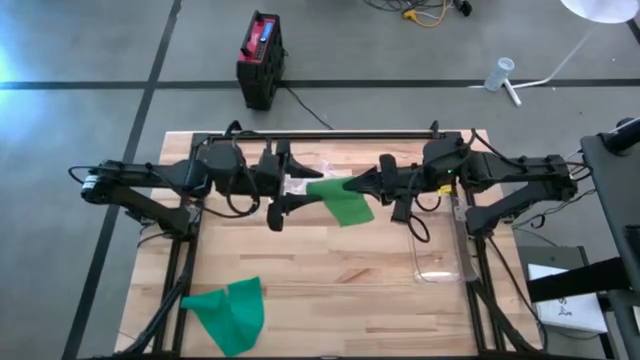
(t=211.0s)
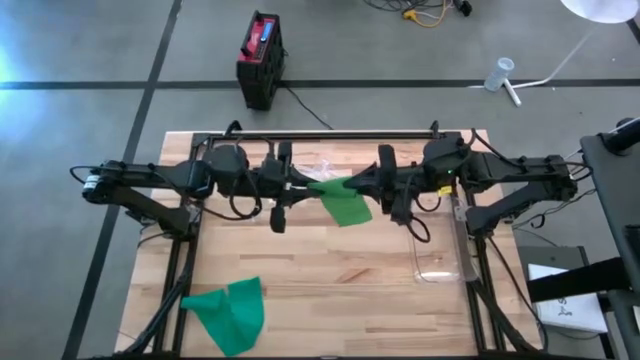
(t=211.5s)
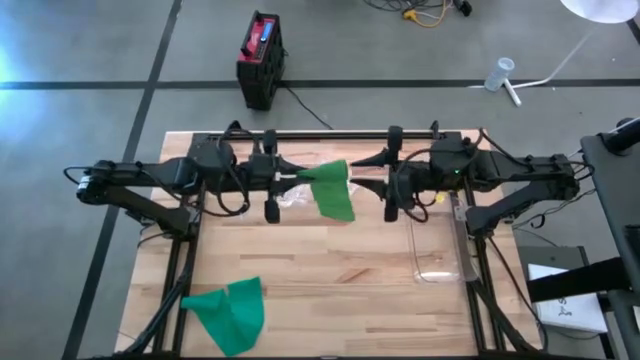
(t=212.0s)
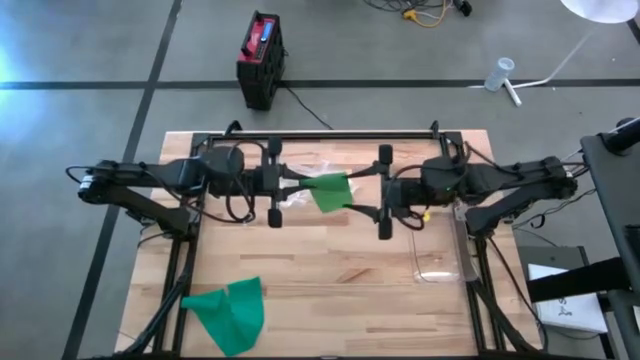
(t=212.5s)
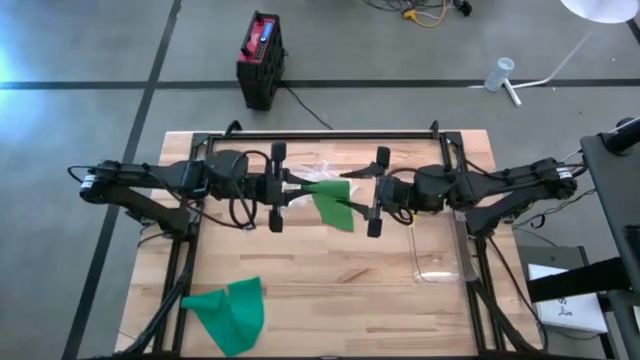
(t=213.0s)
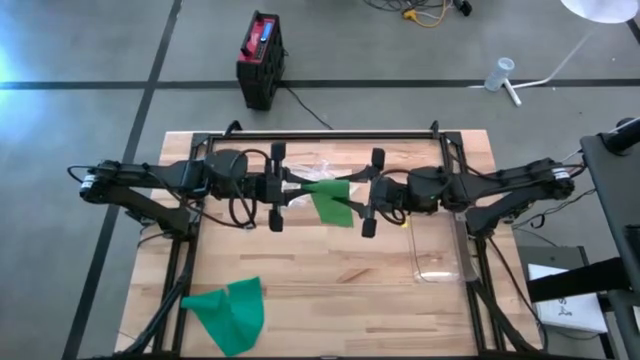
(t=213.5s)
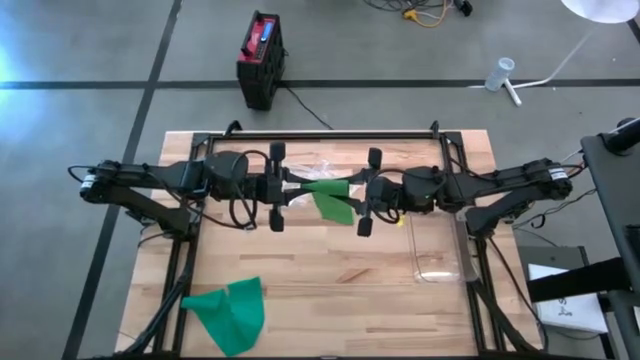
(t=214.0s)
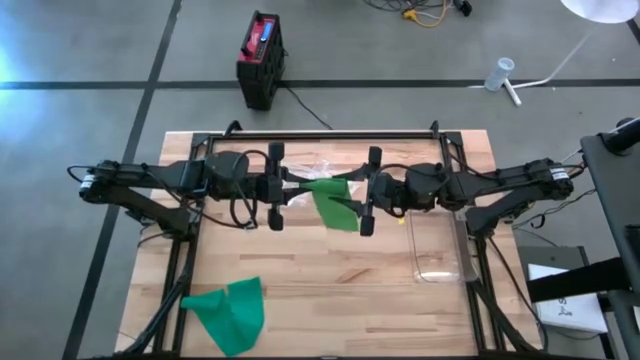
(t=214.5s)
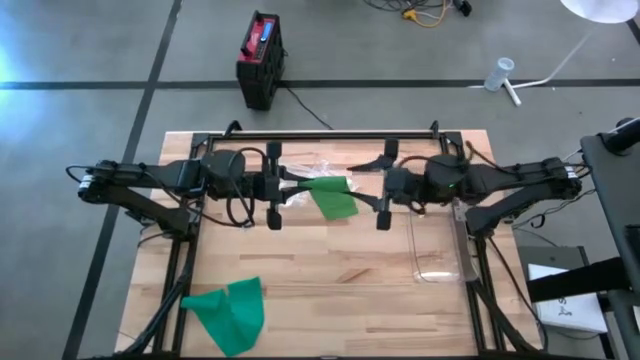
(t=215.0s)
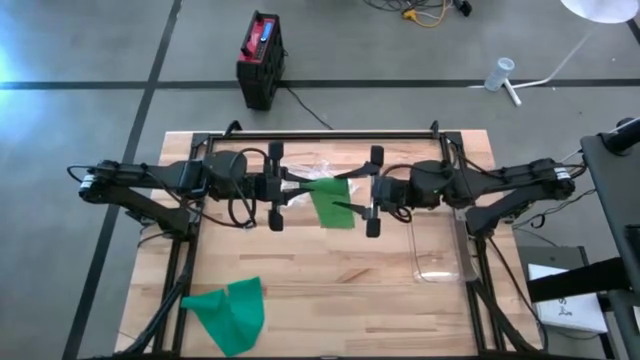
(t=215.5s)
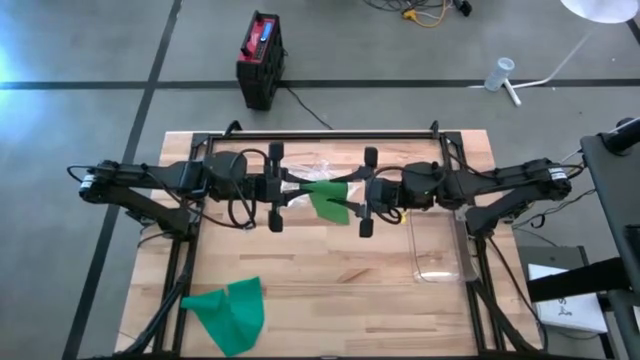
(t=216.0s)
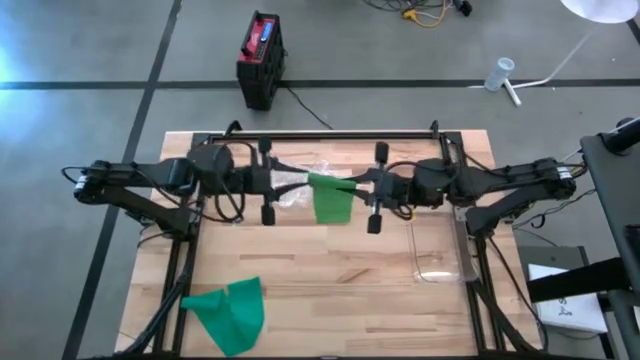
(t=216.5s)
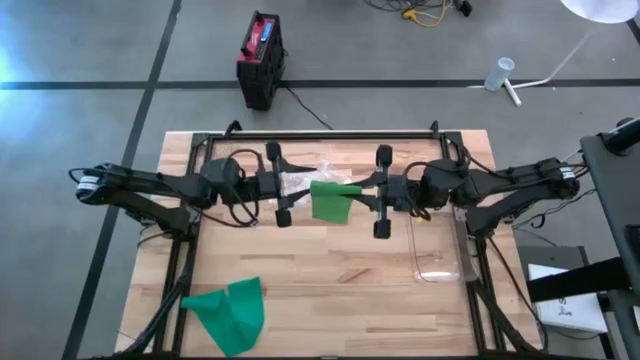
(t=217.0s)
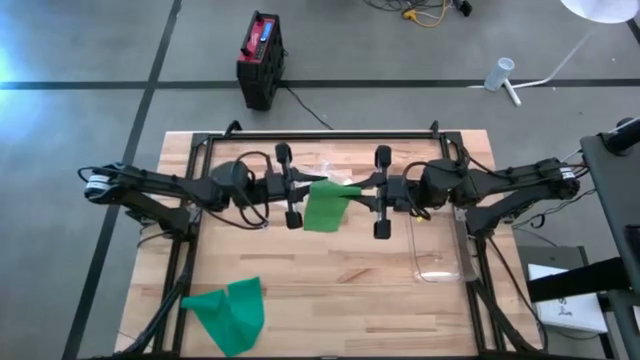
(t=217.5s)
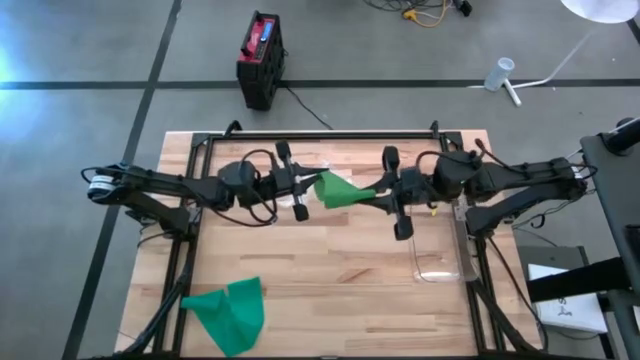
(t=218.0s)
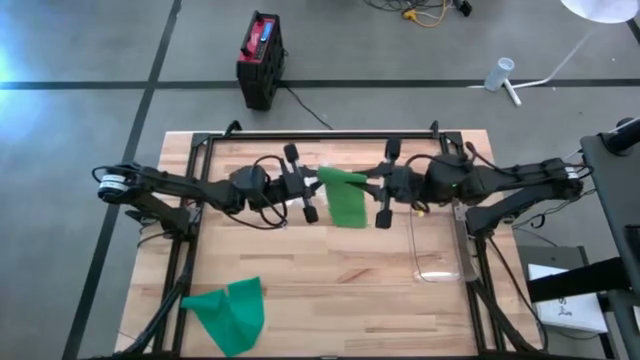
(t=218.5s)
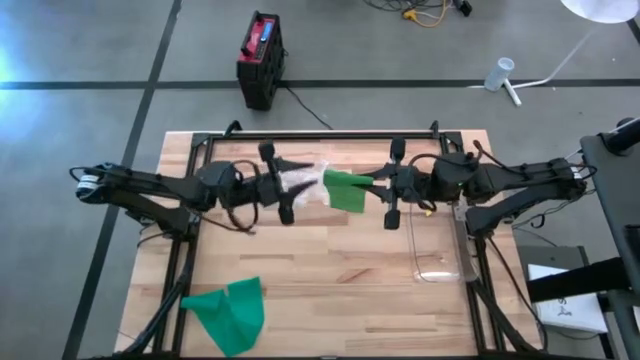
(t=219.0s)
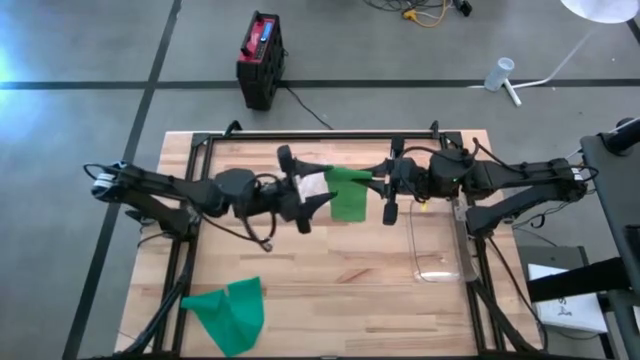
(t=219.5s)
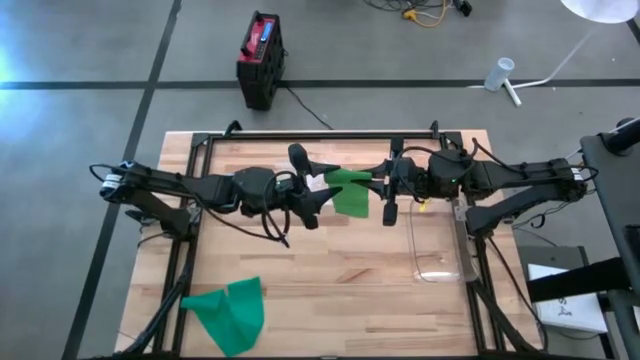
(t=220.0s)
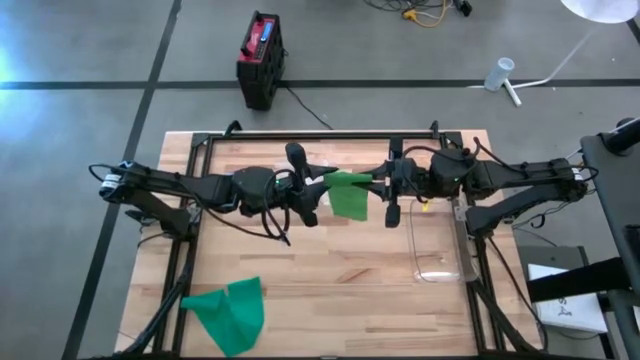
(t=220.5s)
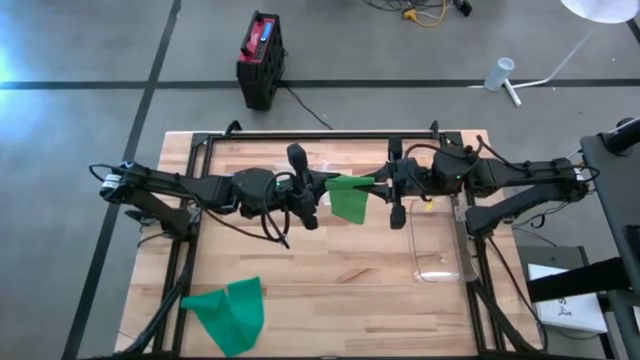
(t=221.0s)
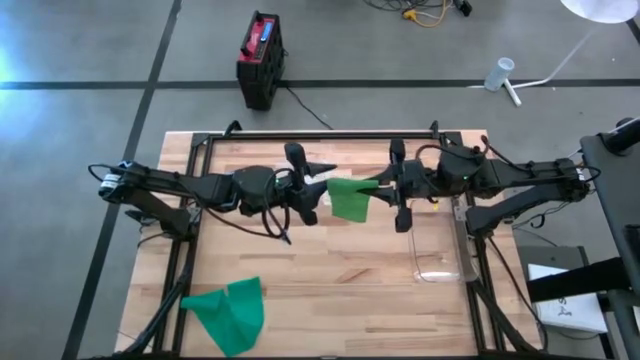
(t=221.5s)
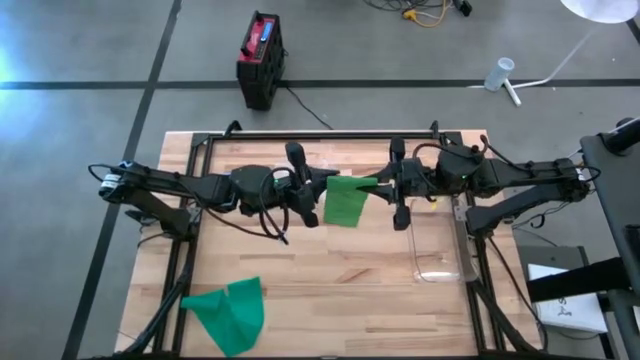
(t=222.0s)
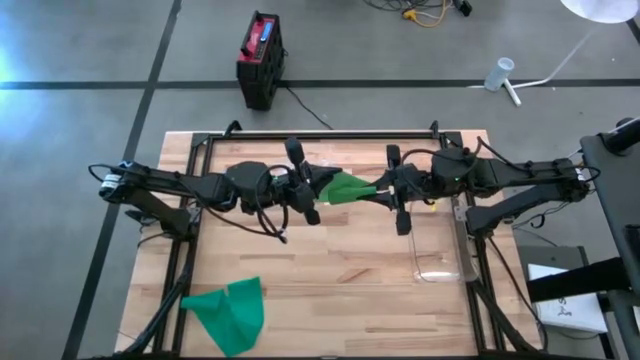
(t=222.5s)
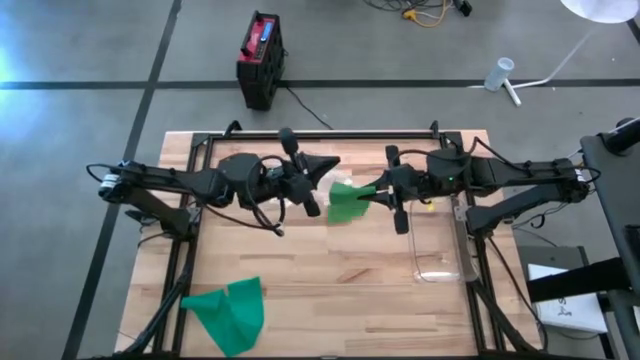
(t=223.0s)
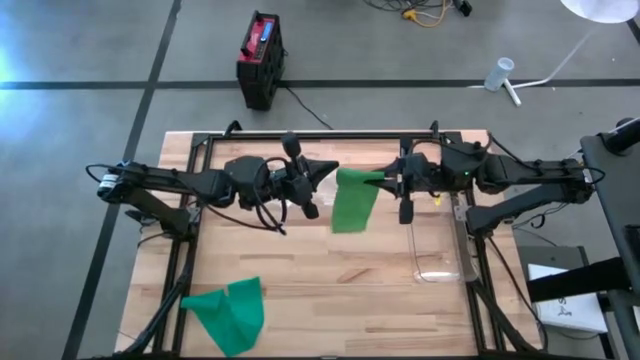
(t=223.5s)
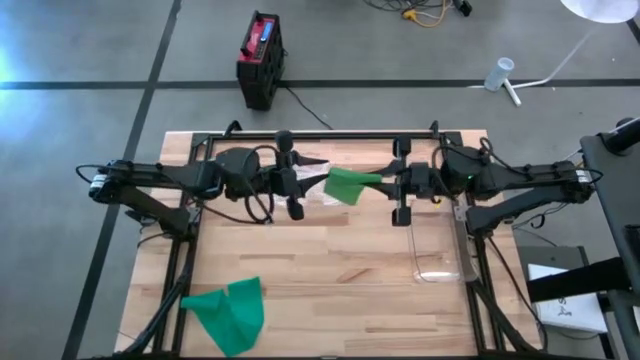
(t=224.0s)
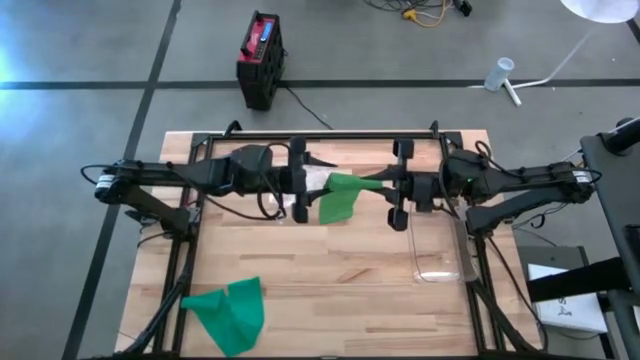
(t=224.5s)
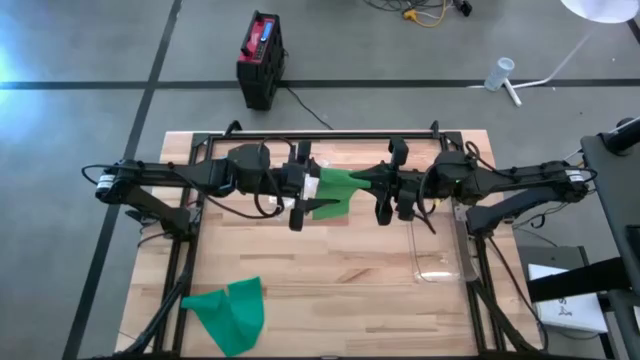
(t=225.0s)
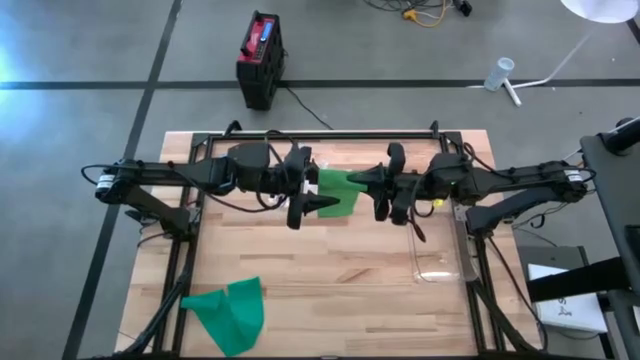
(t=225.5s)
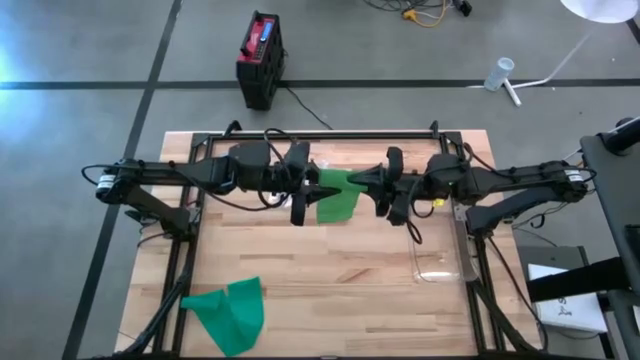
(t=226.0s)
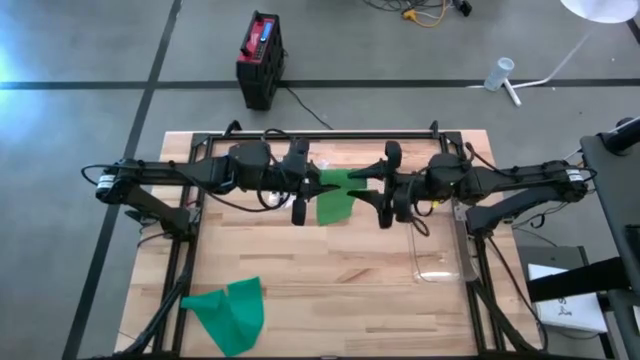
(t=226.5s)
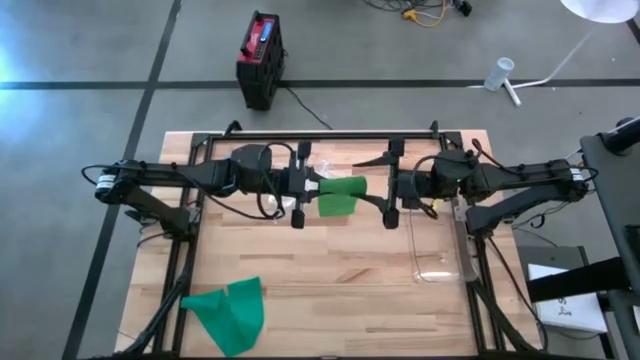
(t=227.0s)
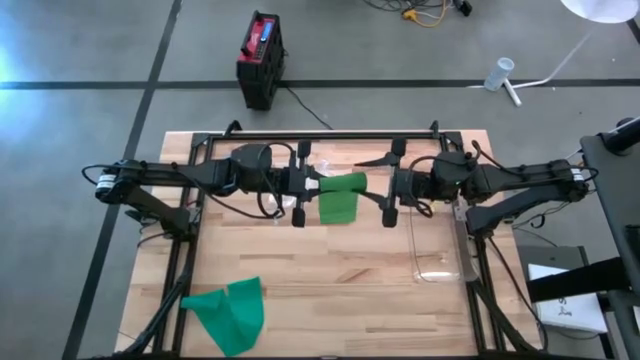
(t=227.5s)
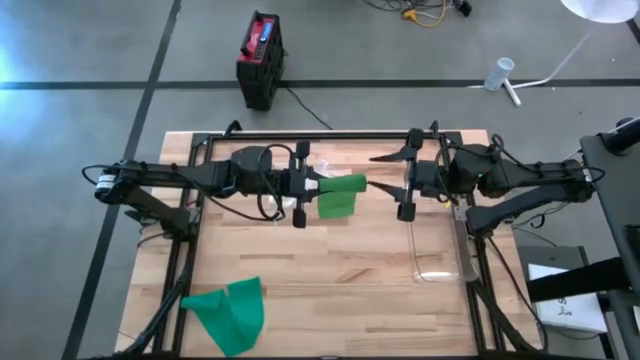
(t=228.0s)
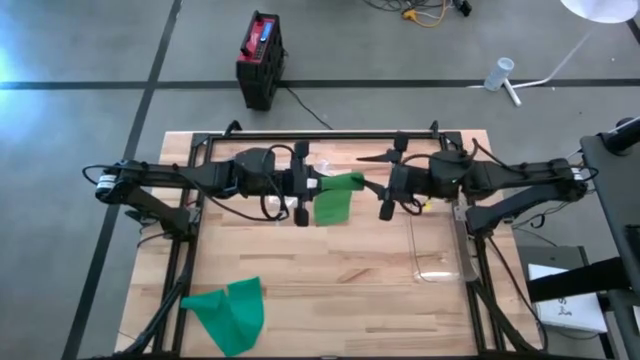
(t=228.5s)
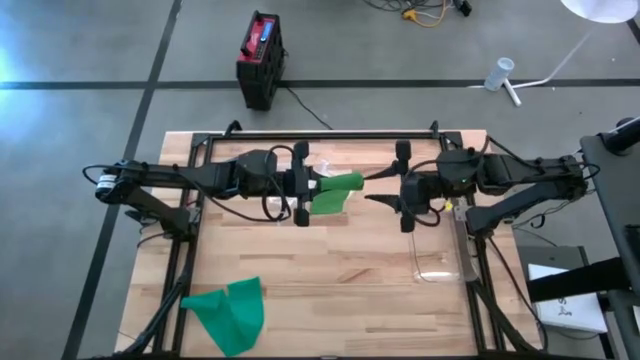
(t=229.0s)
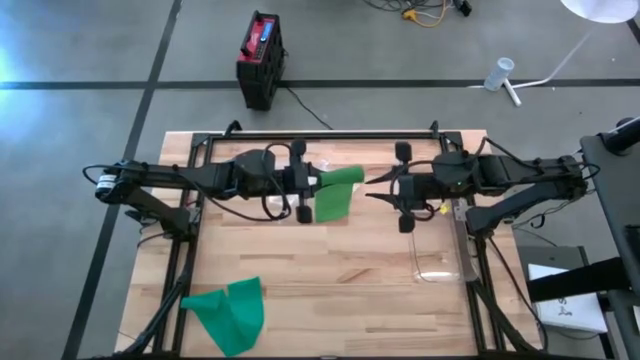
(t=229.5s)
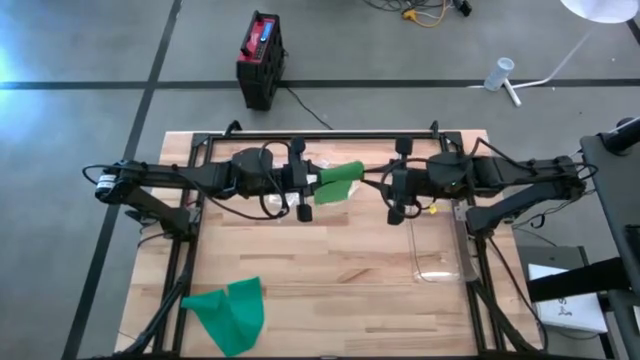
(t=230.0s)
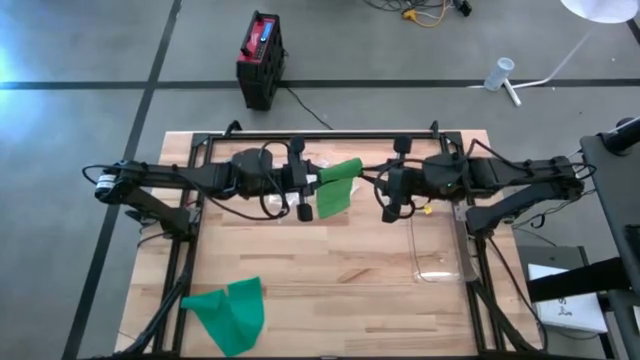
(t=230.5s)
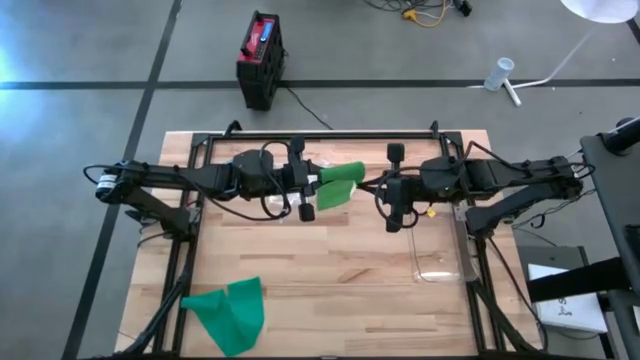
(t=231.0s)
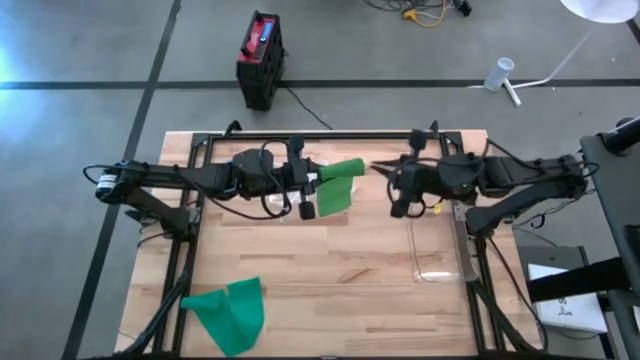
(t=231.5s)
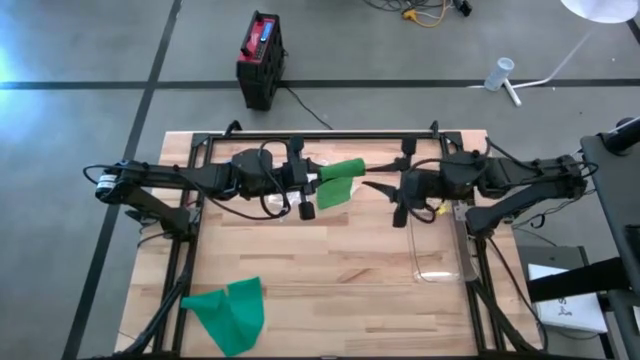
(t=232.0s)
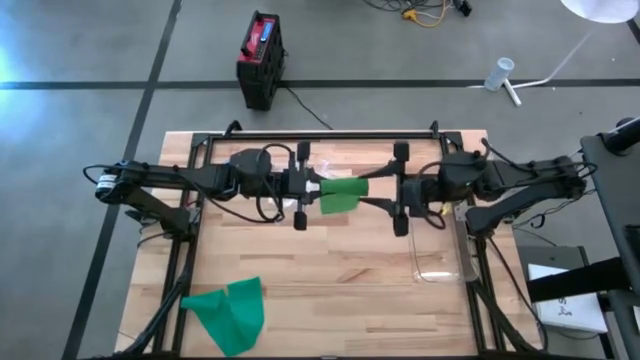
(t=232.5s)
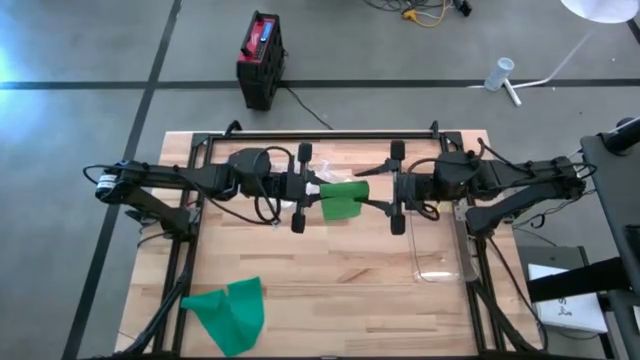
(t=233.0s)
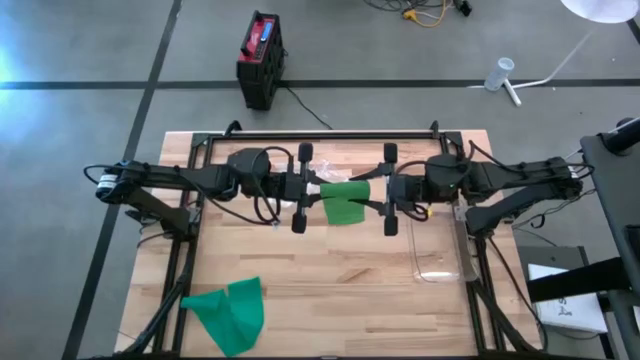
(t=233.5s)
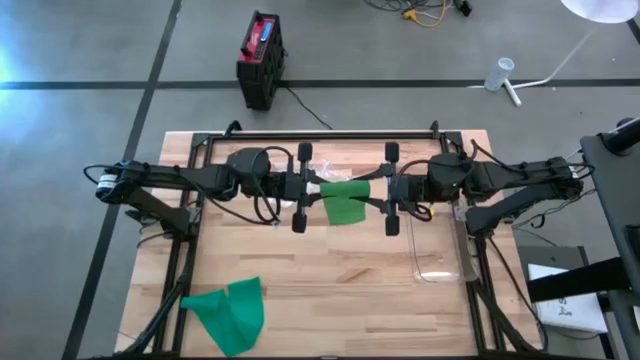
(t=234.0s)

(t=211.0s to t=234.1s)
Task: Roll bandage
Roll the green bandage
